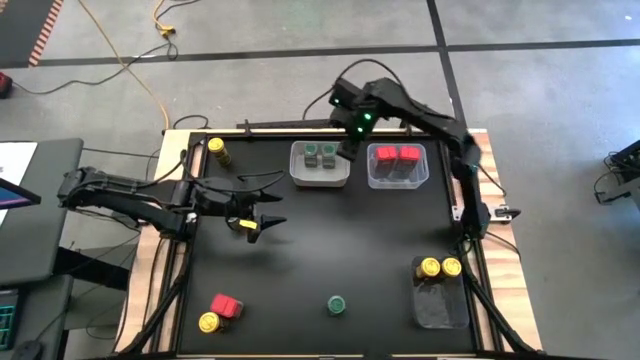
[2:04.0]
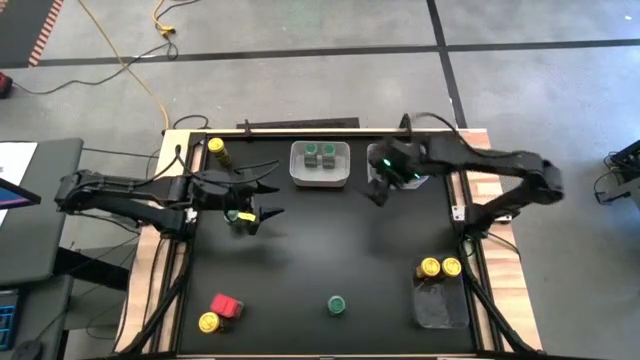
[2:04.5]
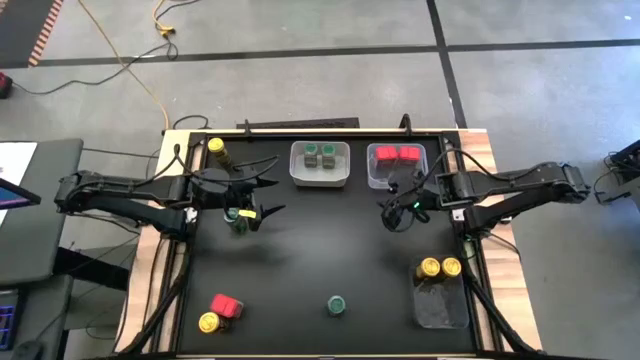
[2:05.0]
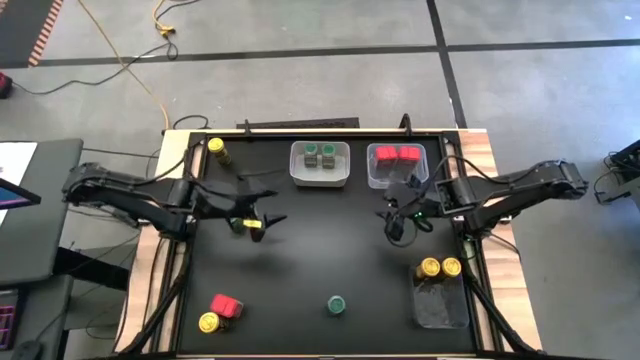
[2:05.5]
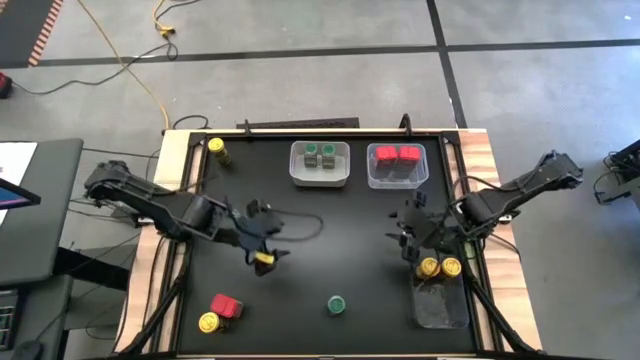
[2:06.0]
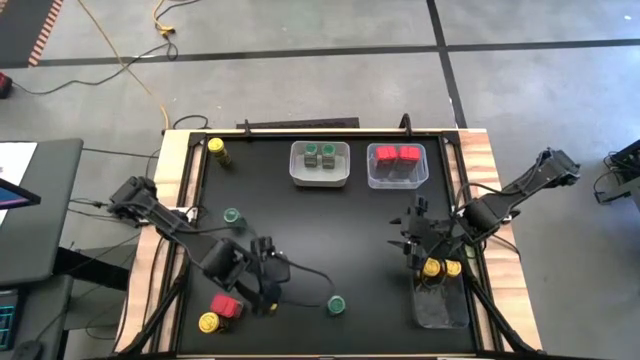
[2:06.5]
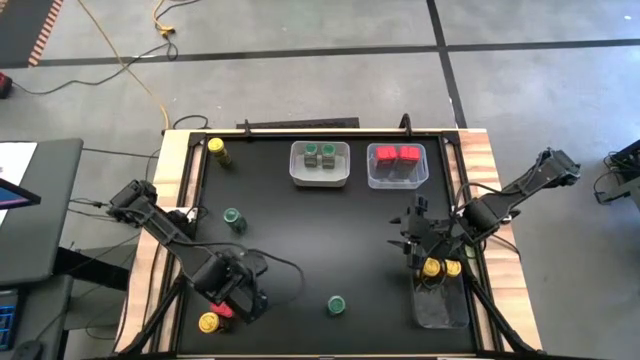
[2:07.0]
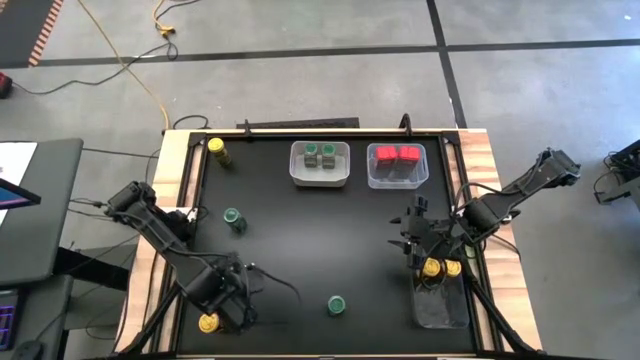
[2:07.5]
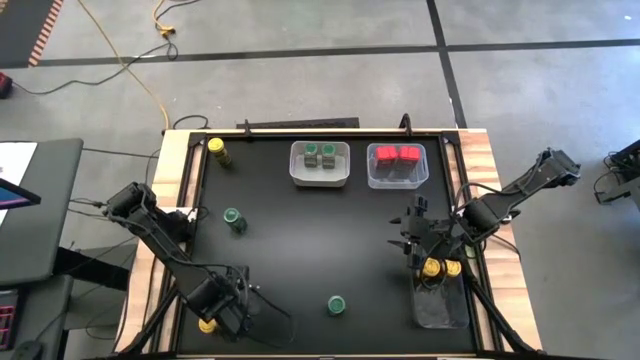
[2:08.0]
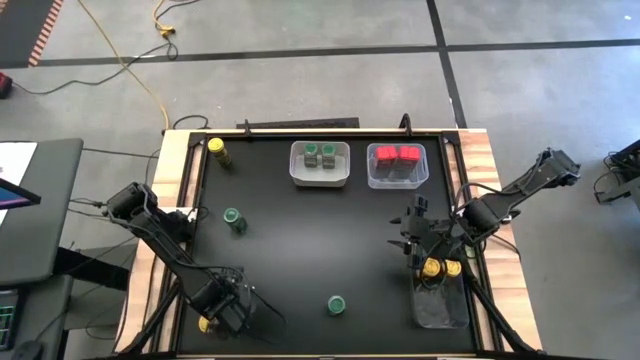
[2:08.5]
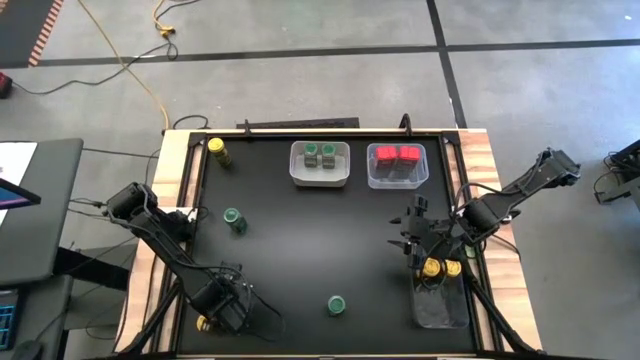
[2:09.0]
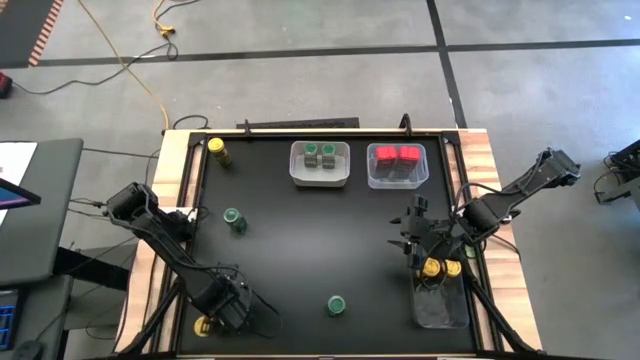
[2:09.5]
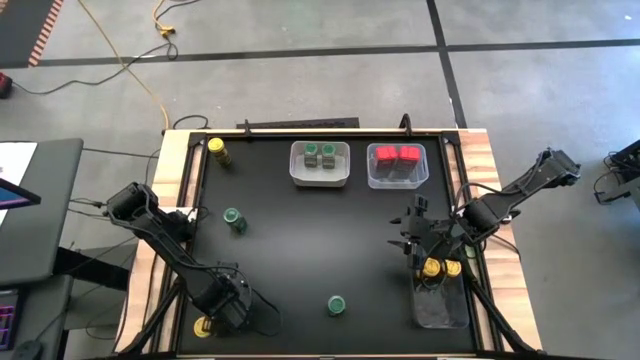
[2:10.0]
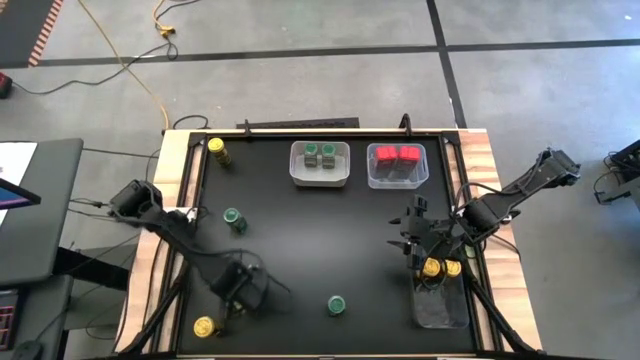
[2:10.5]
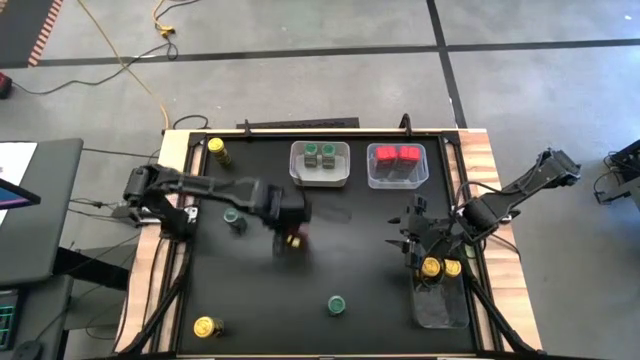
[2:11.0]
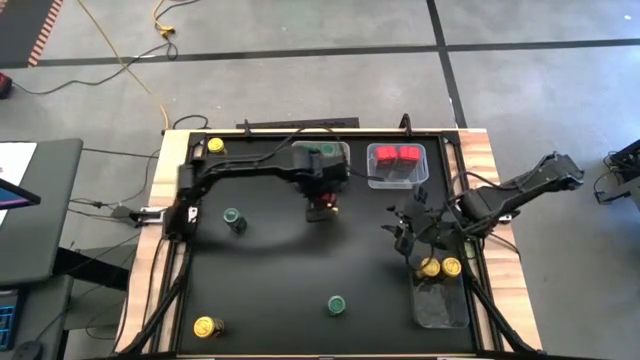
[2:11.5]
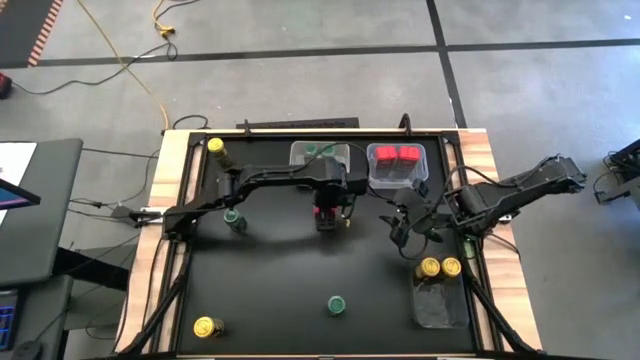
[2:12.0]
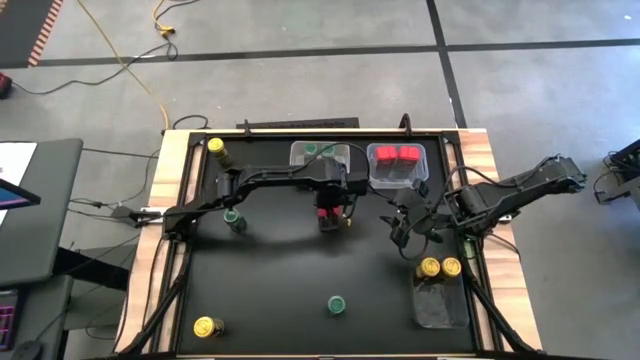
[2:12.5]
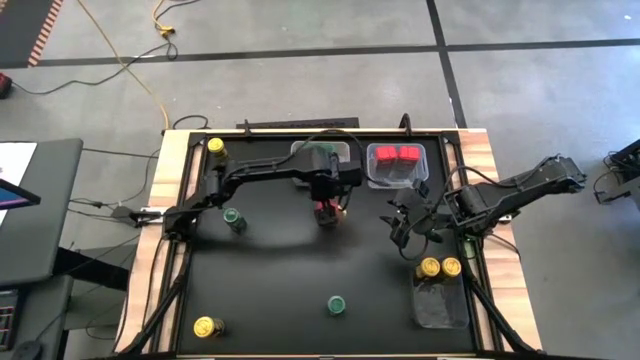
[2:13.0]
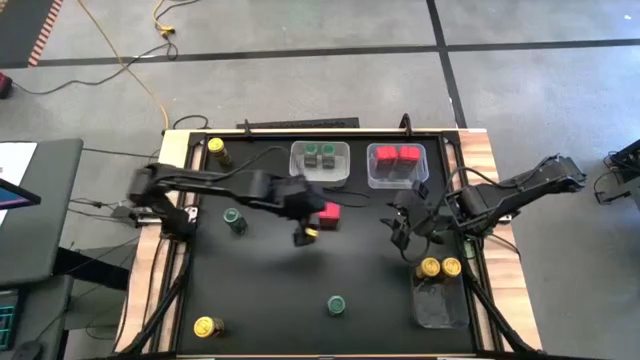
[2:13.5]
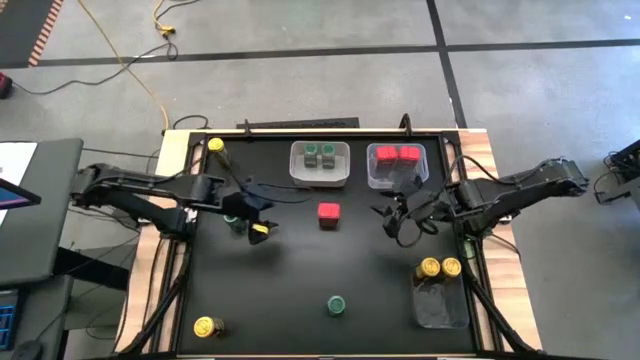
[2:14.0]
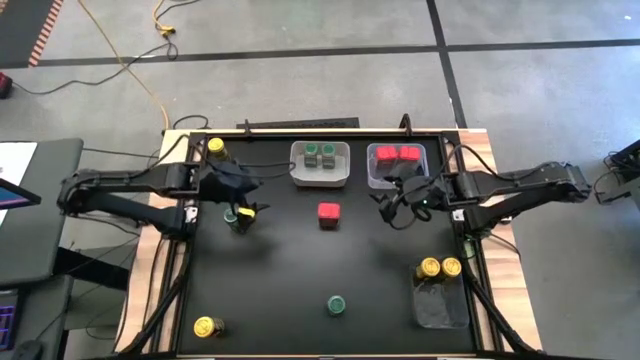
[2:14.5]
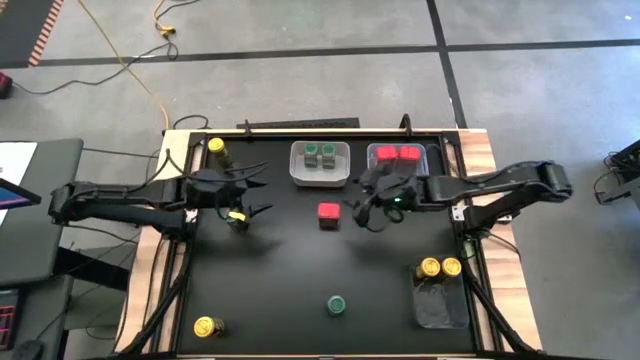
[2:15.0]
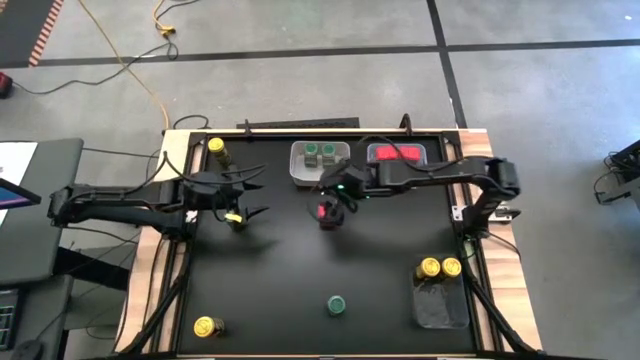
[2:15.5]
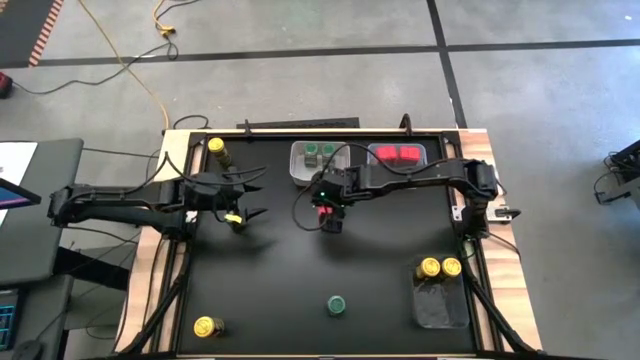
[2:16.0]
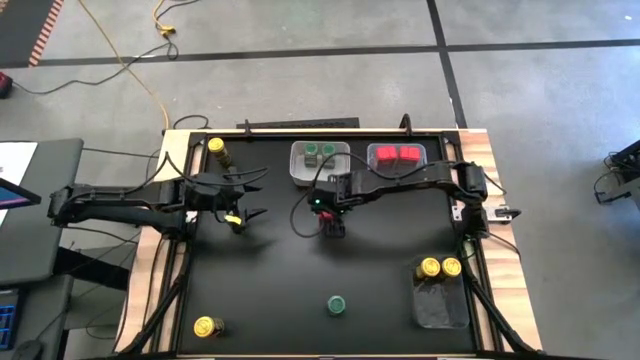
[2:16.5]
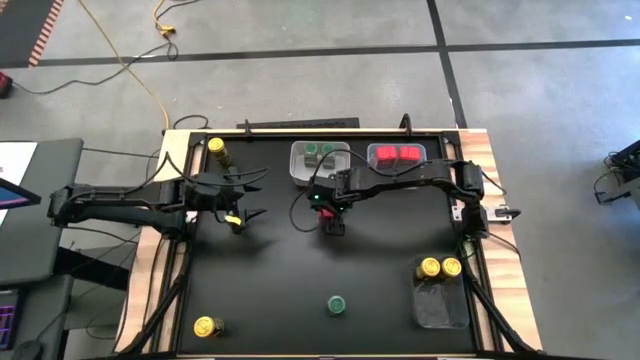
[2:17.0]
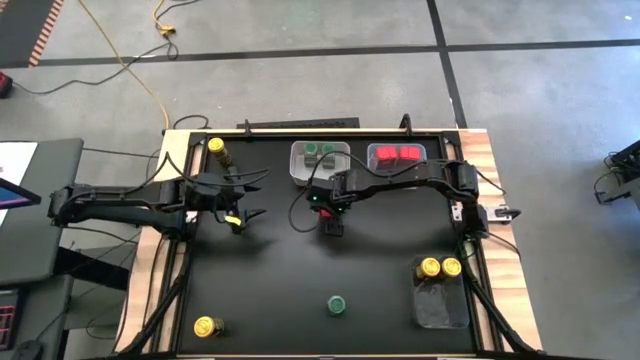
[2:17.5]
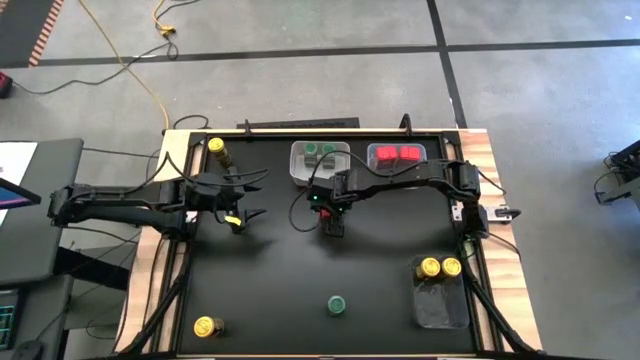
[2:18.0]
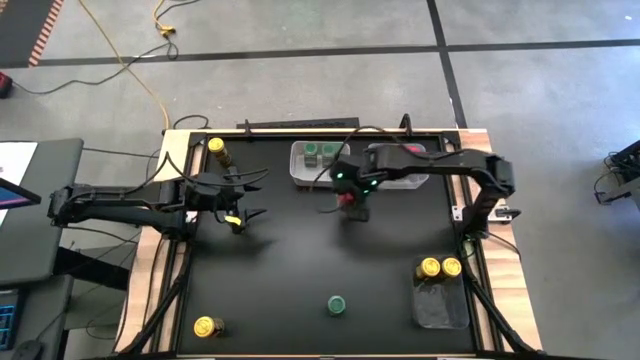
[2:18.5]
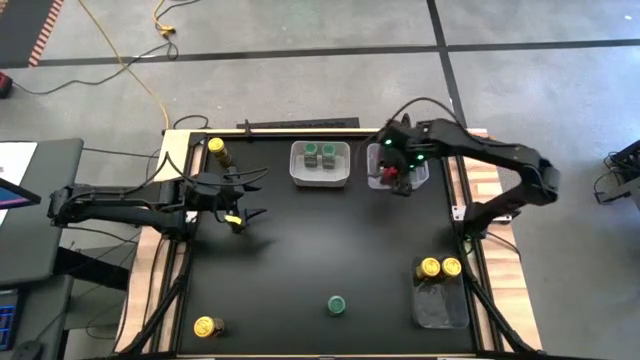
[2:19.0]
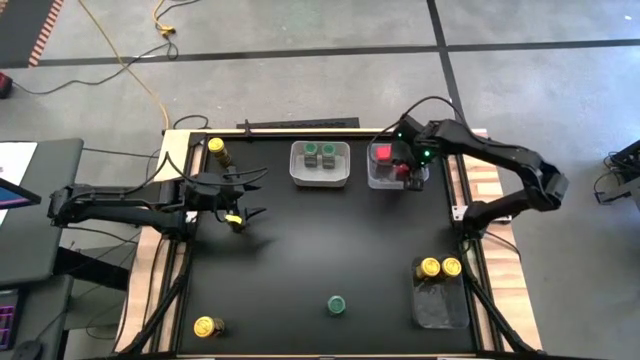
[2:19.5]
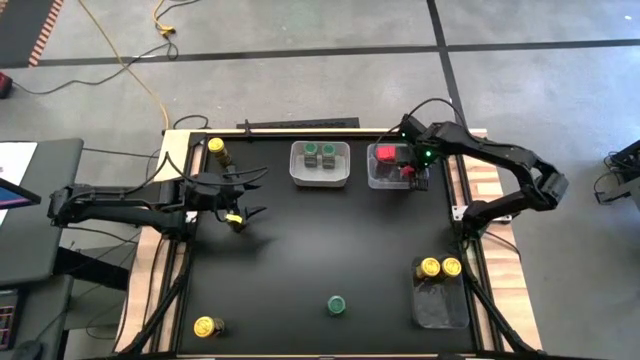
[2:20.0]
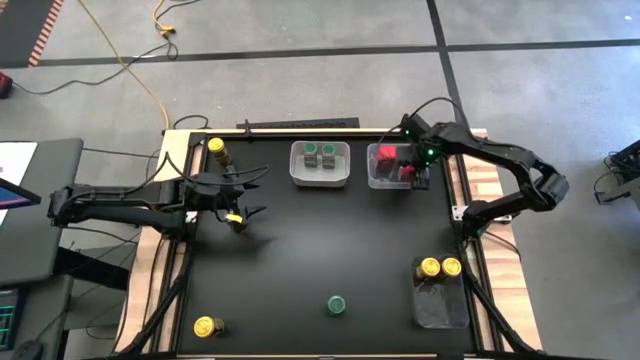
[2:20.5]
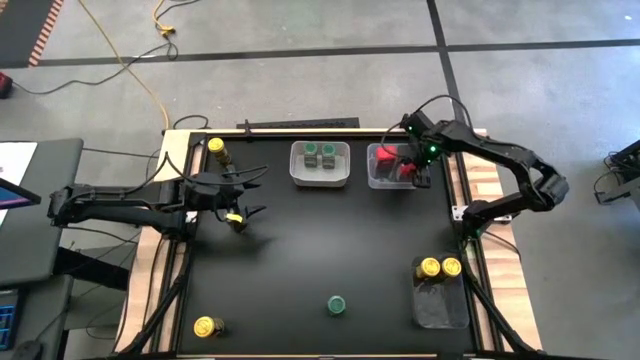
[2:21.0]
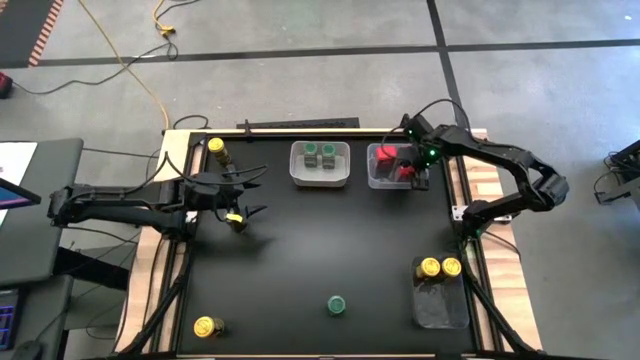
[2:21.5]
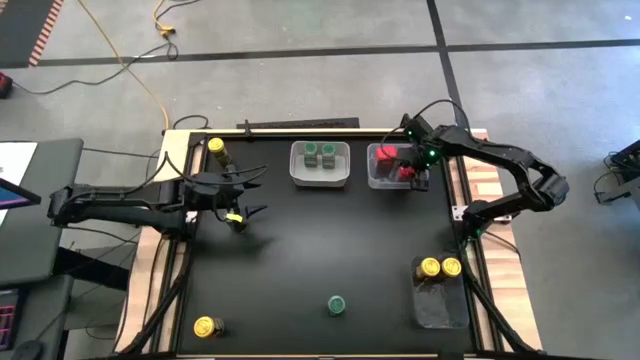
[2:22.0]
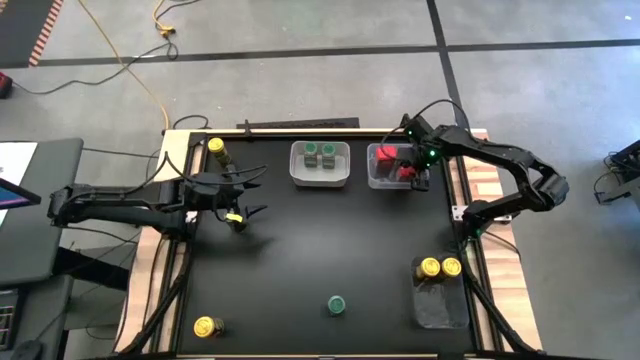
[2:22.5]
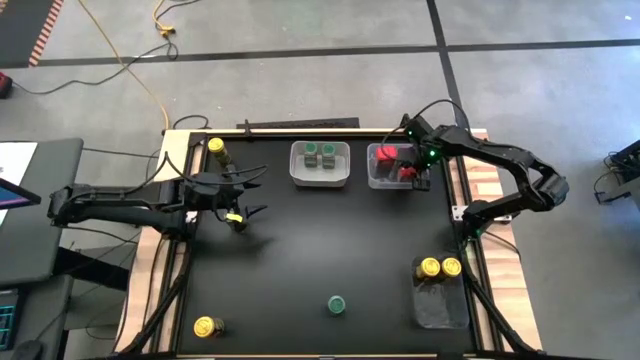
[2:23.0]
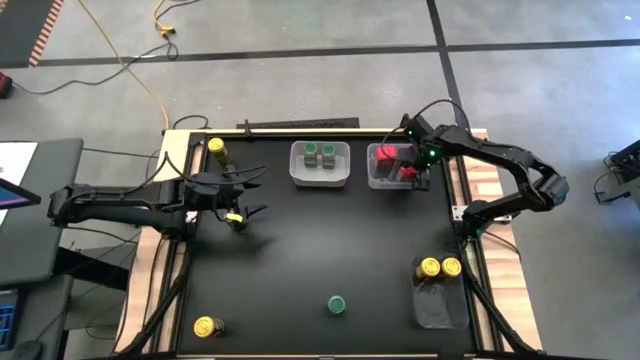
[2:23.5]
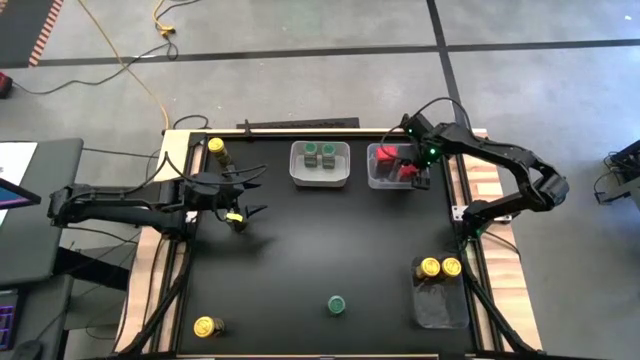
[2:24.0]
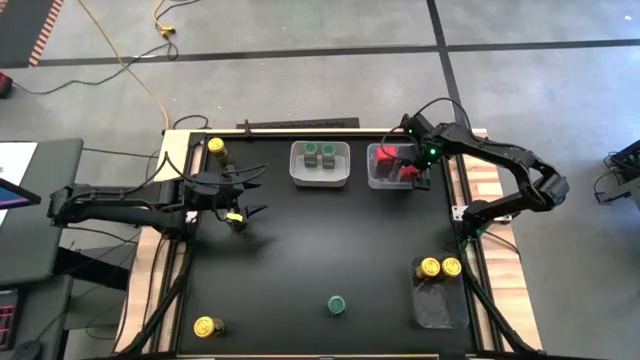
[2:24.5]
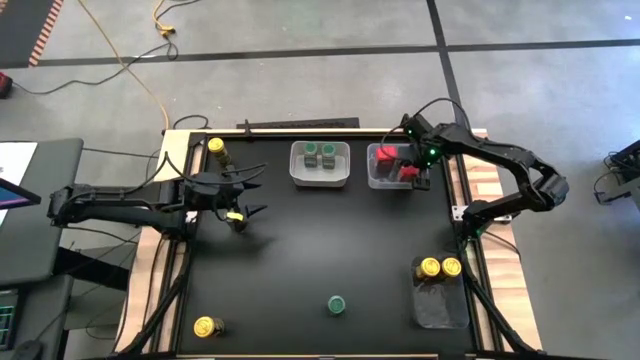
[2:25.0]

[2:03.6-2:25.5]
Task: Sort spices by type
Put the red seasoning can into the transparent bin
